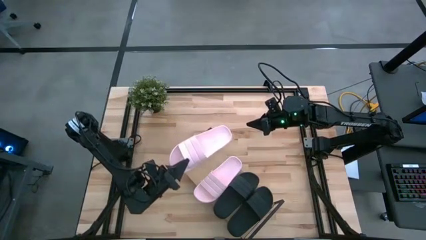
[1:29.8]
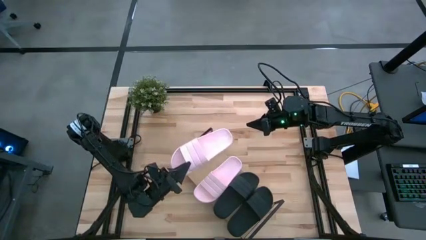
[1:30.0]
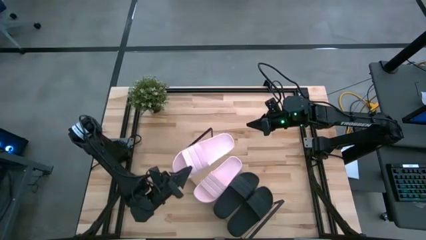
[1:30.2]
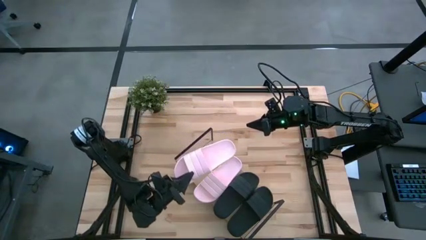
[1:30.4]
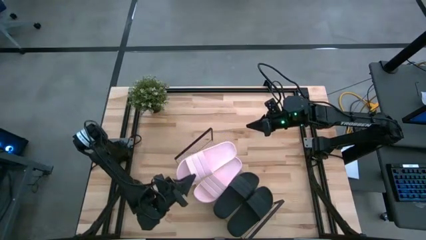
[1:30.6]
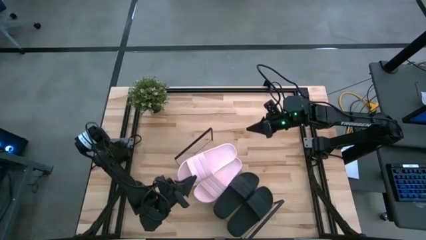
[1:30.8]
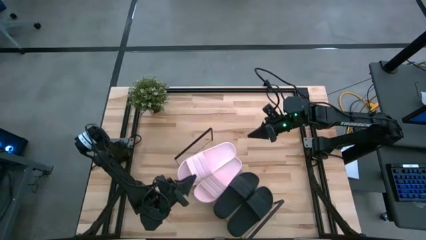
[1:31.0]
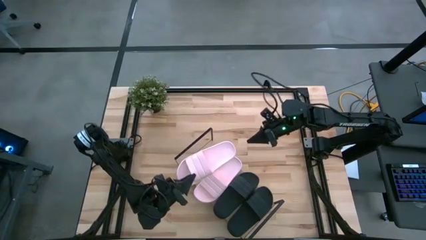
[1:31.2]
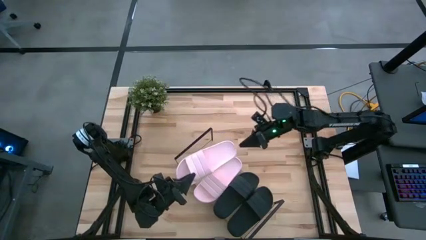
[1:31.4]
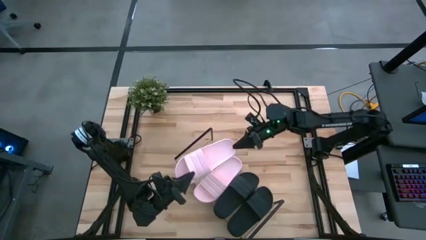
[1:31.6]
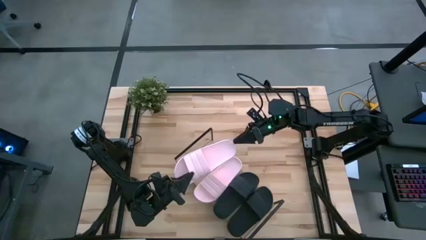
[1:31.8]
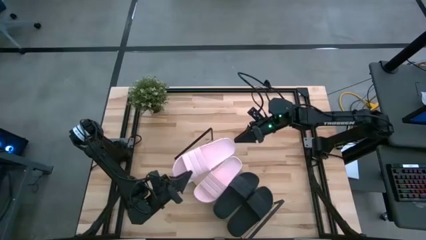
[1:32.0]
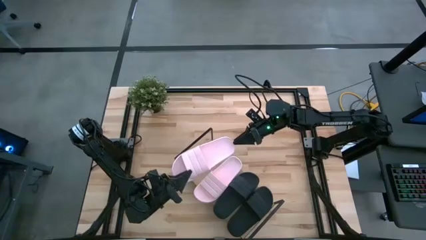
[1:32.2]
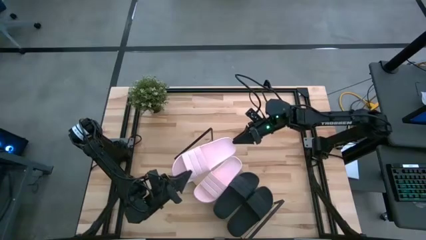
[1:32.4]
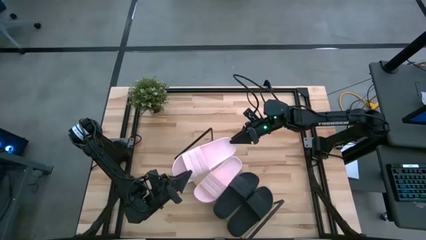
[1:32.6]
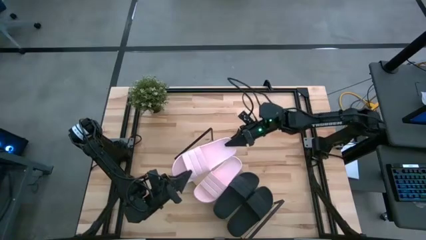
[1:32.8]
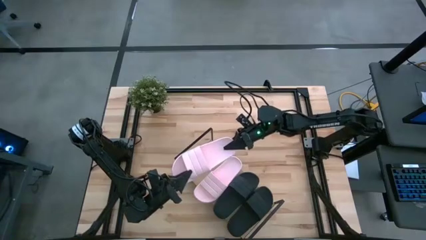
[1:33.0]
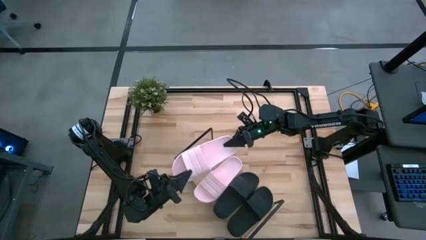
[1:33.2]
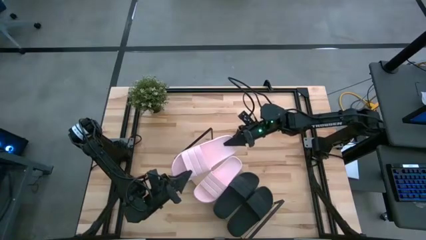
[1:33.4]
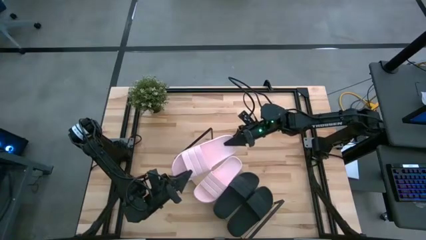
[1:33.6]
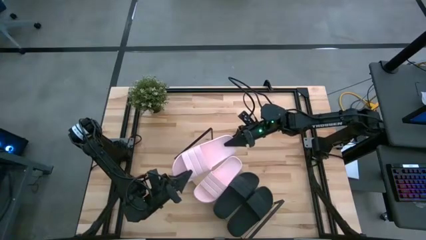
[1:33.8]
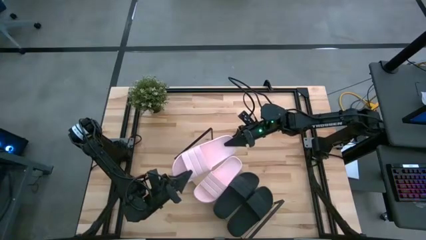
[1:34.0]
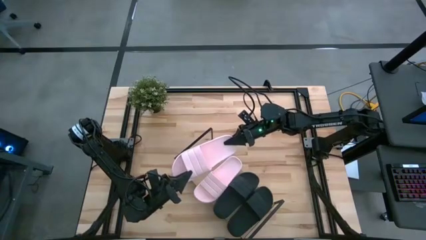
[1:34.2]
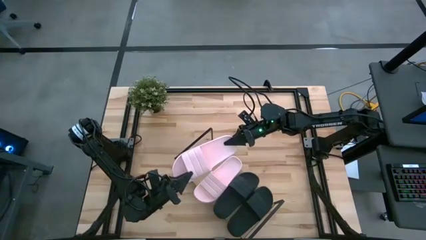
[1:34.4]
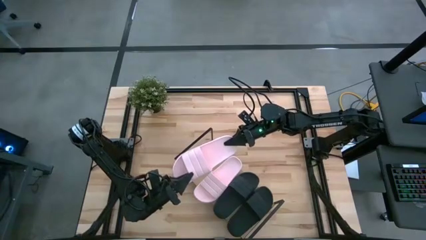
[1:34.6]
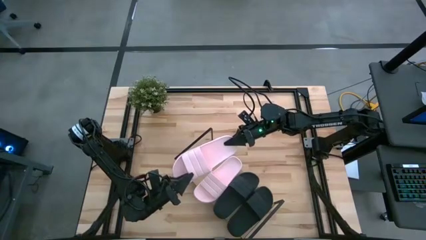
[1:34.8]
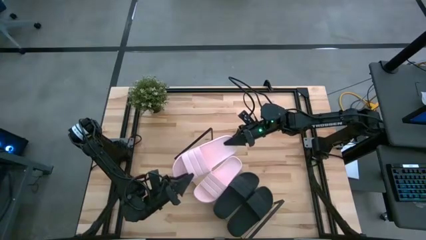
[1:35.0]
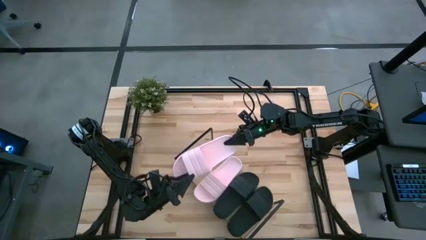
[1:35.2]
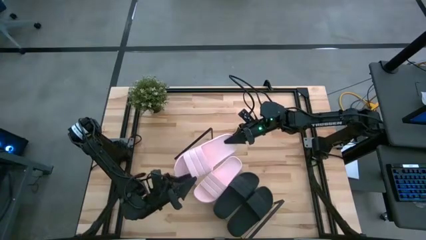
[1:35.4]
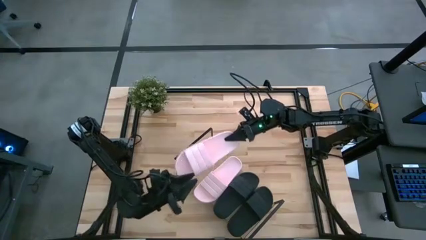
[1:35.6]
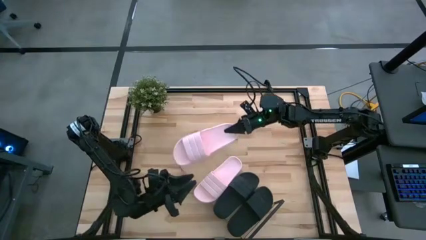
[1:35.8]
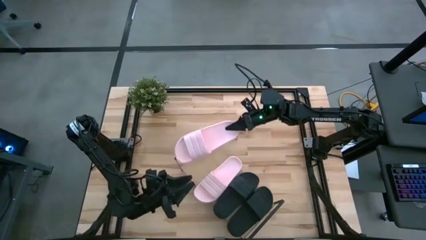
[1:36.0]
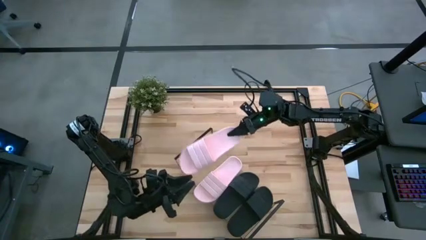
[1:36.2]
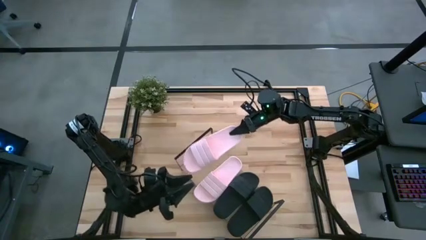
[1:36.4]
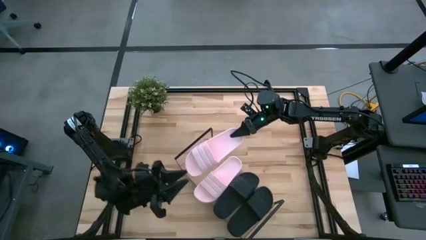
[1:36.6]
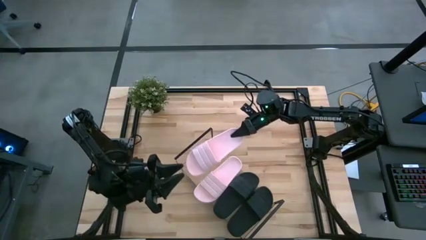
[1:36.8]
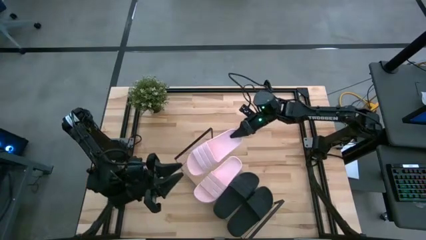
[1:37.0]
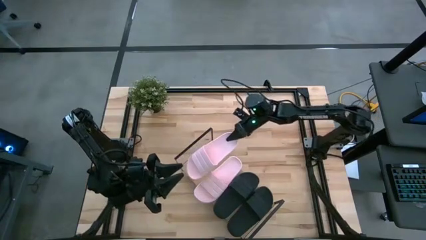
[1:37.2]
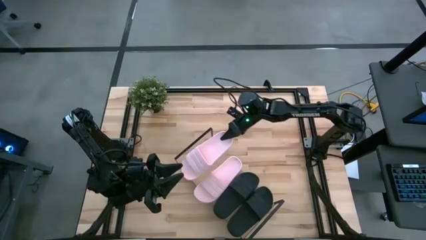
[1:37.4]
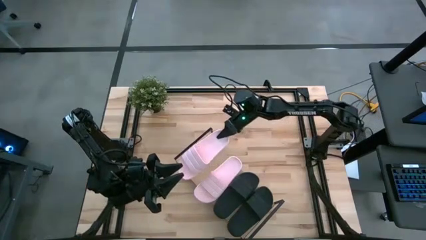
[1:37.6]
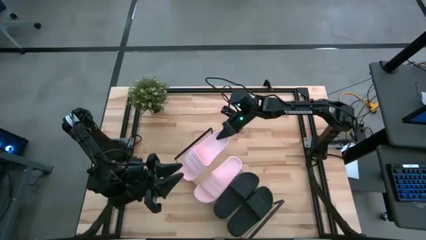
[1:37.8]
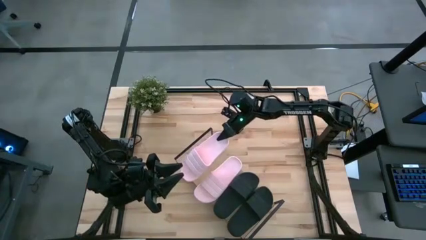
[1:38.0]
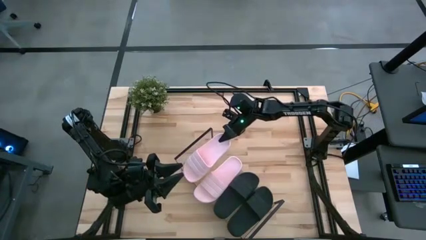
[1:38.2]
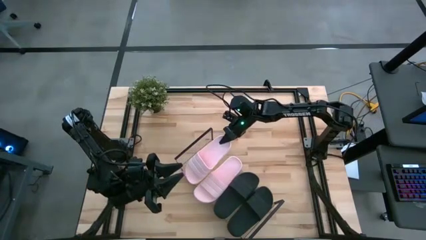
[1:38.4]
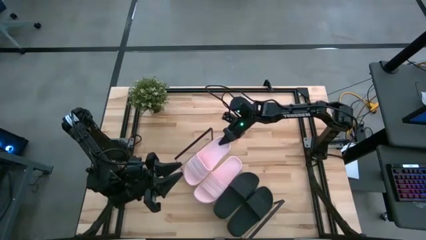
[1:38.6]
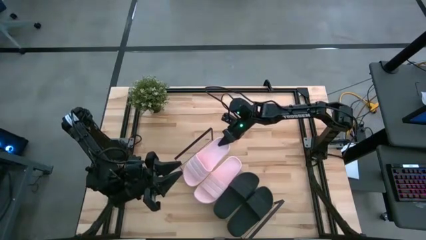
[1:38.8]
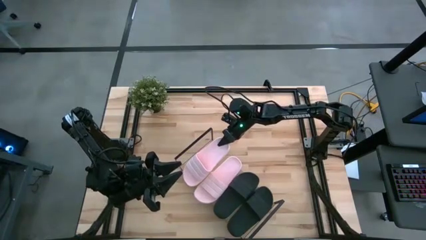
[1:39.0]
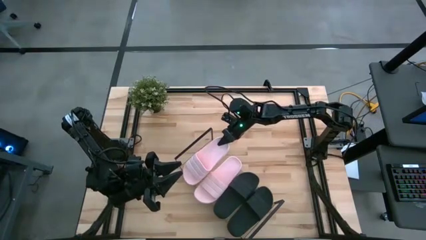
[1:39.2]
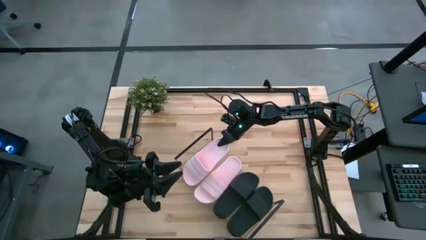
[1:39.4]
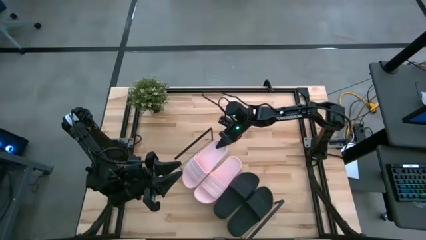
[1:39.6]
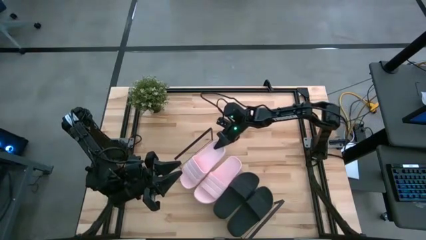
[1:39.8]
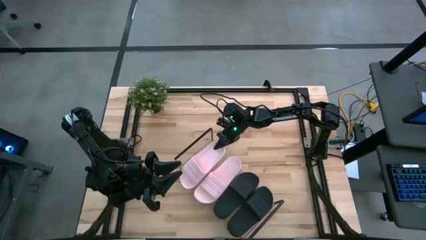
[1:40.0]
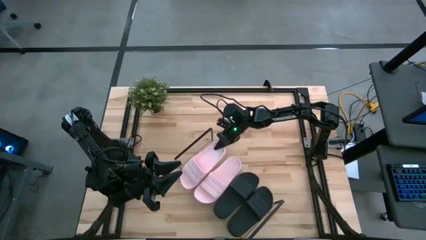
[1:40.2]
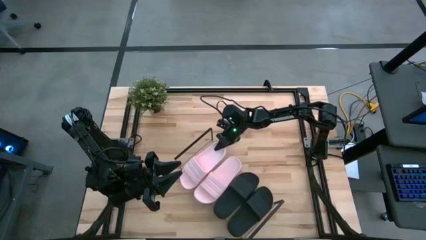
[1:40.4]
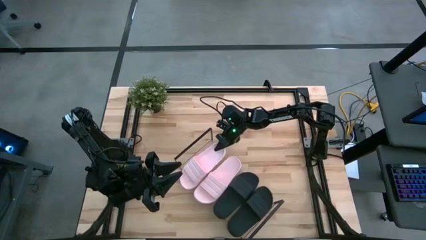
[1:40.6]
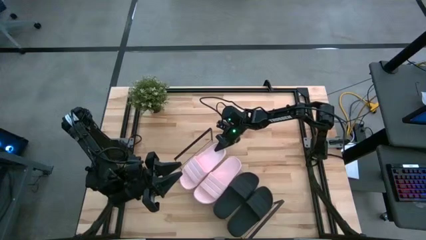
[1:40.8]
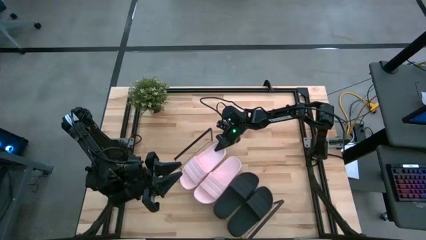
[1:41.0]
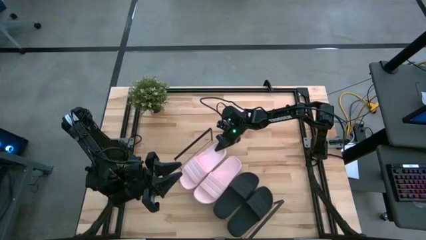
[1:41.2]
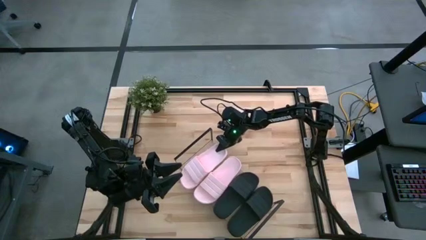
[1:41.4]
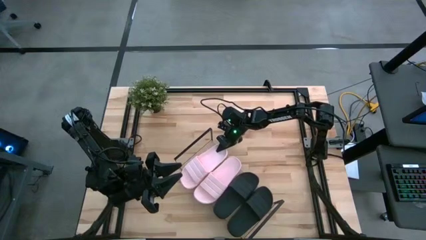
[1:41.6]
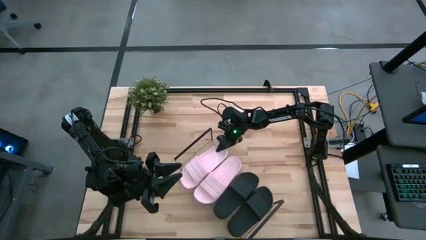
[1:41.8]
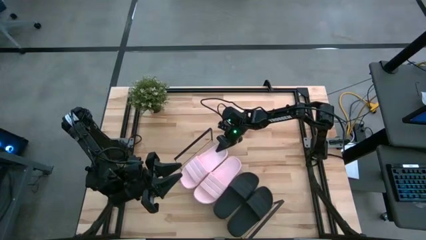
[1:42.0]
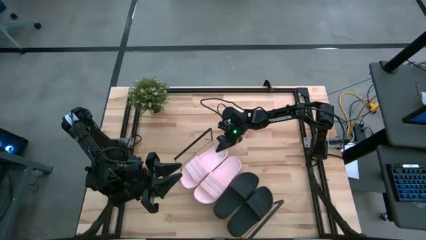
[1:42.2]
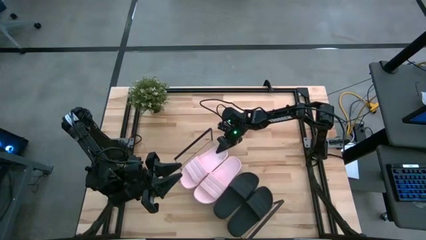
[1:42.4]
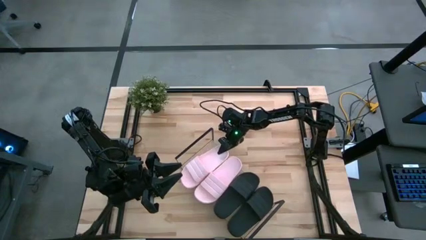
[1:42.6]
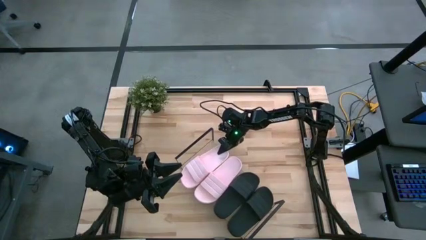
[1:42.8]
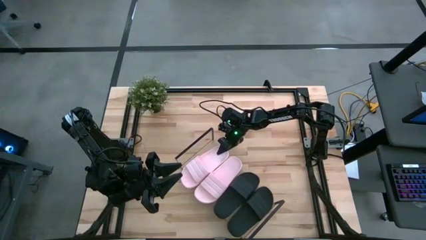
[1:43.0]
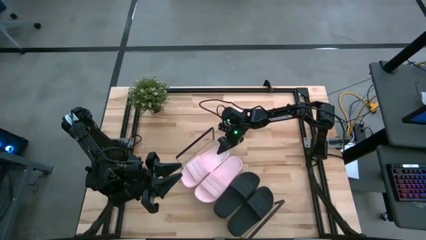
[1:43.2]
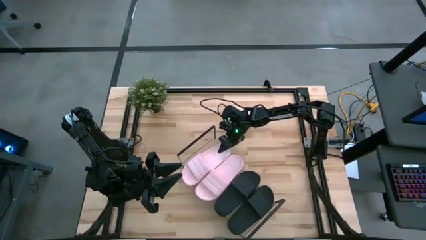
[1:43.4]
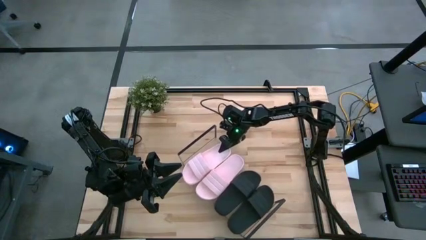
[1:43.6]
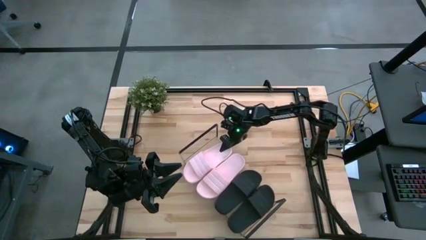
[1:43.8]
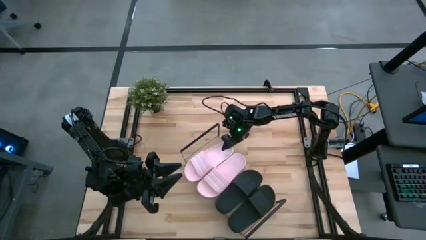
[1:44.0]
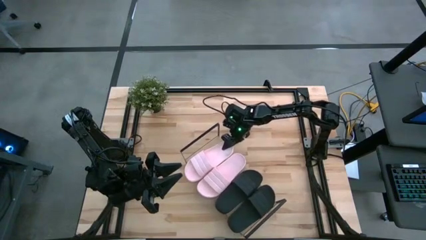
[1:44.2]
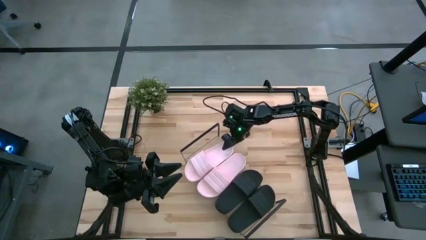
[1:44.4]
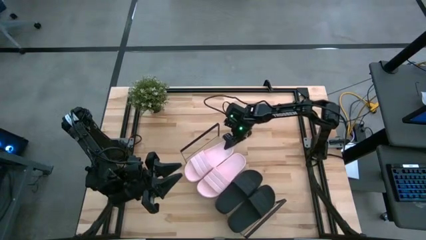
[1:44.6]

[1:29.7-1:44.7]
Task: Pick and place slides into the shelf
Put the pink slipper on the shelf beside the other pink slipper

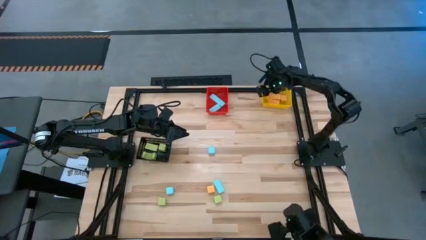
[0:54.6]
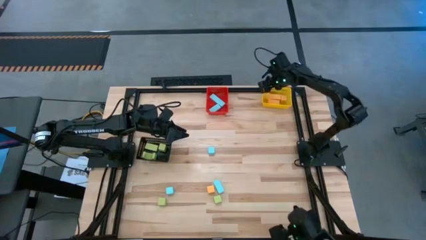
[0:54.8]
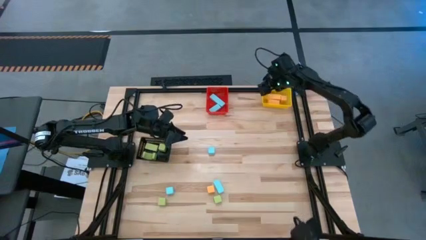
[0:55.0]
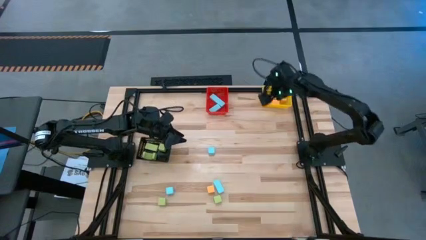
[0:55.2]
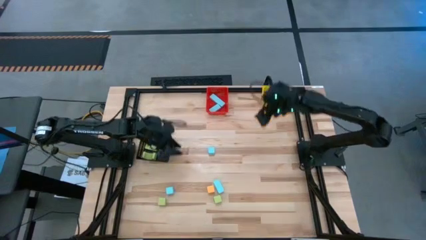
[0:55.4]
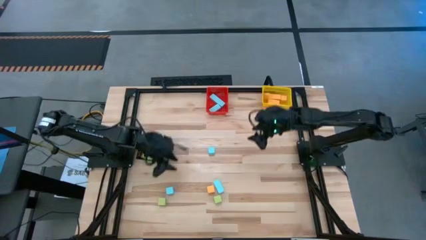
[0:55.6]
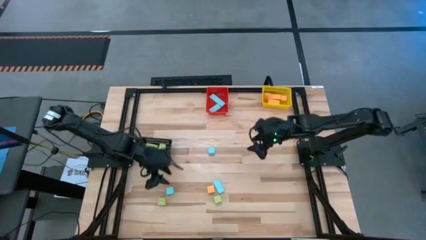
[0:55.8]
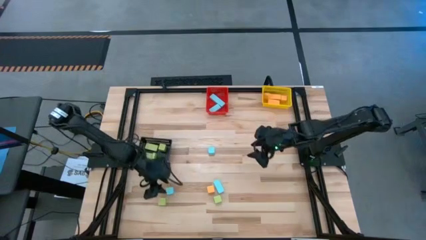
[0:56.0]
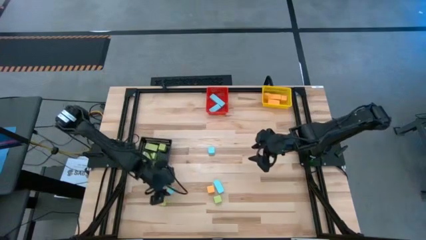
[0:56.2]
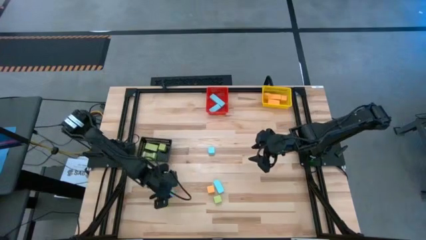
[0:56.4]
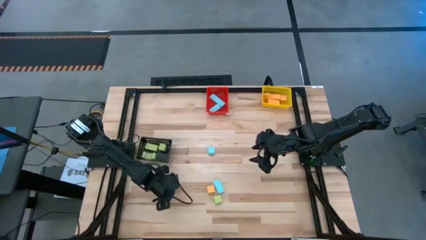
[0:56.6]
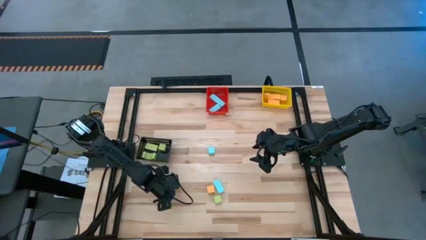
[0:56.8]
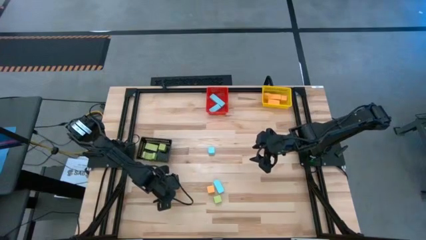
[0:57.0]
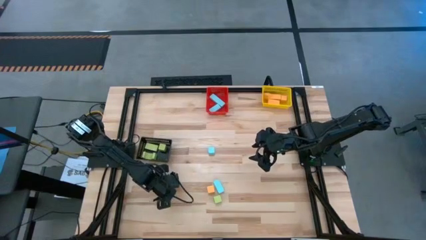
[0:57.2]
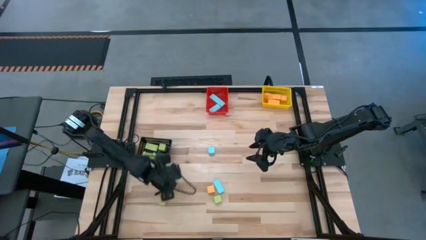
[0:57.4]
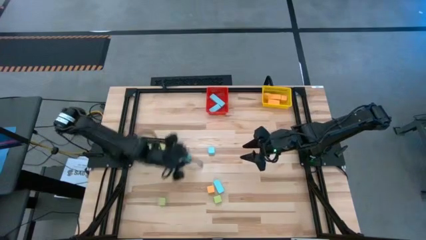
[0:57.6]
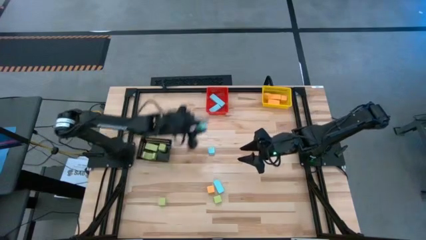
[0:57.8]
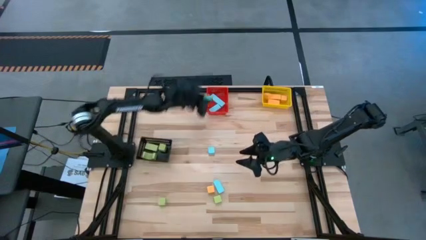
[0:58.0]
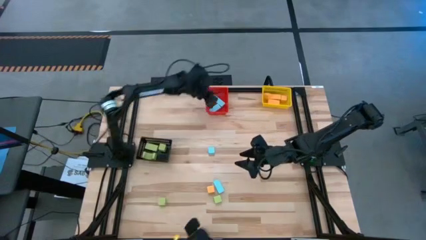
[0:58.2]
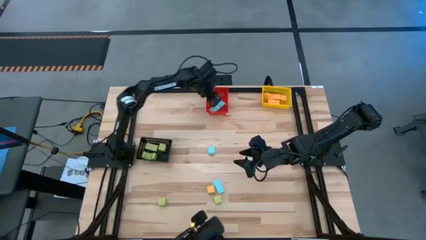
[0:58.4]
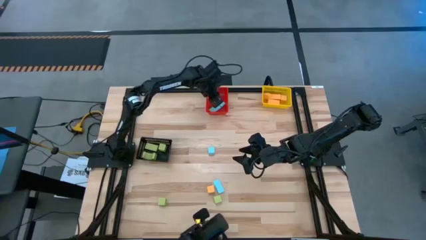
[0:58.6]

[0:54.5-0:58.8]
Task: Sort & place blocks by color
Put the blue block into the red bin
